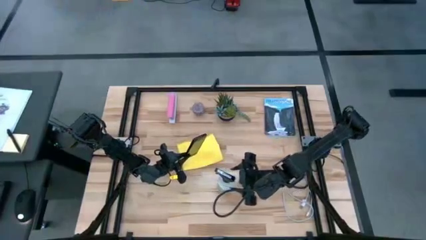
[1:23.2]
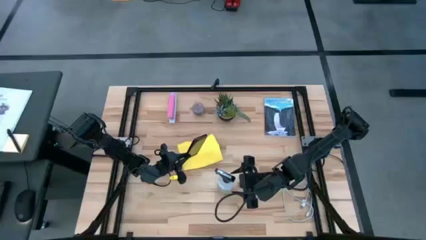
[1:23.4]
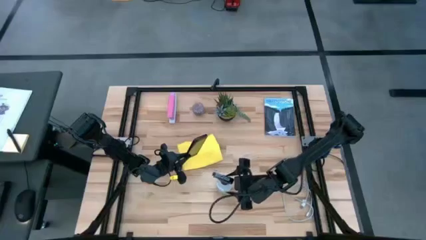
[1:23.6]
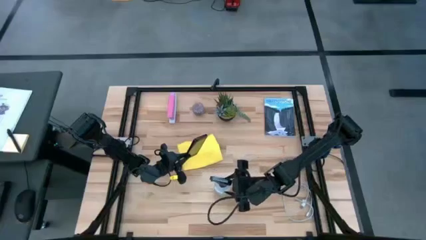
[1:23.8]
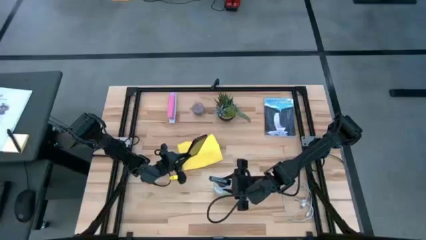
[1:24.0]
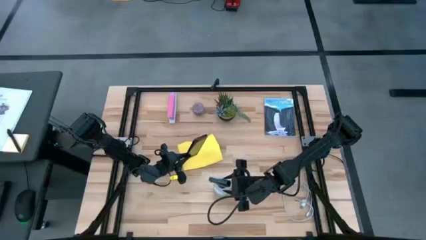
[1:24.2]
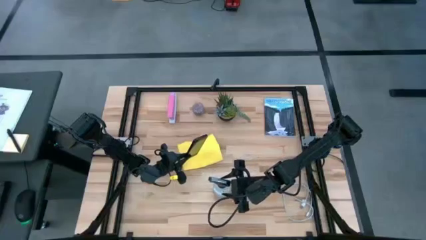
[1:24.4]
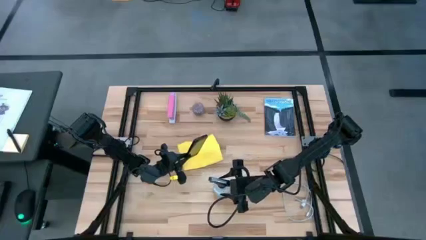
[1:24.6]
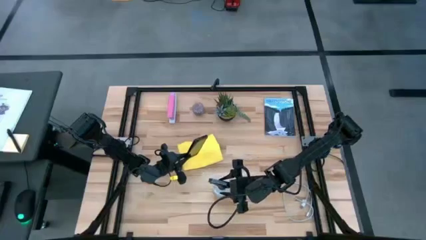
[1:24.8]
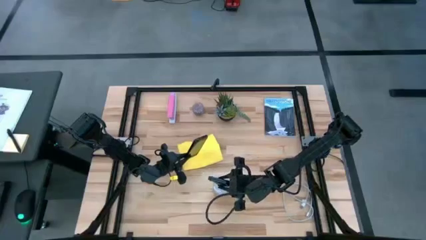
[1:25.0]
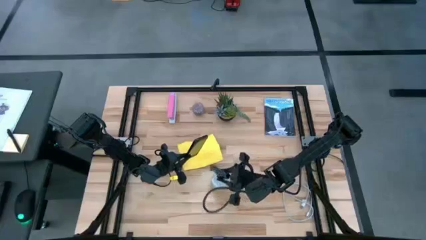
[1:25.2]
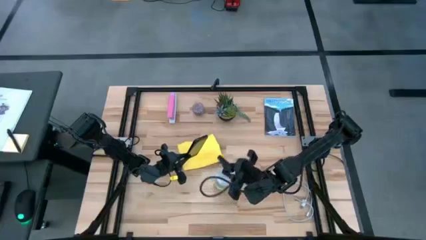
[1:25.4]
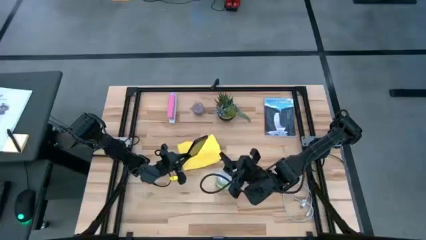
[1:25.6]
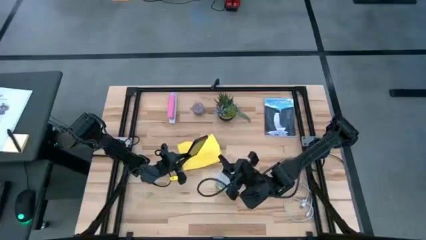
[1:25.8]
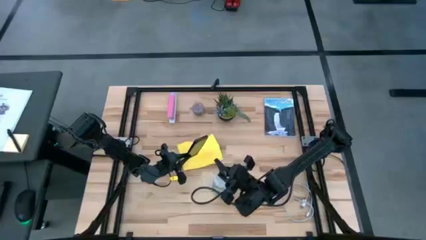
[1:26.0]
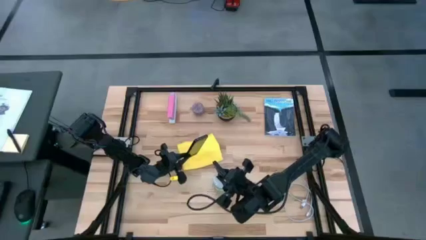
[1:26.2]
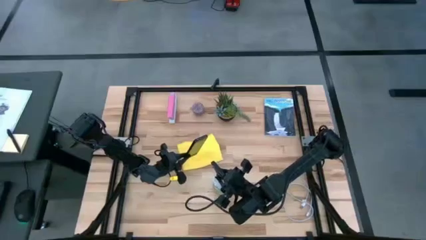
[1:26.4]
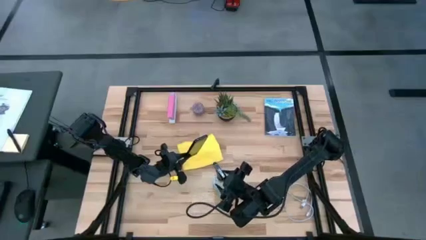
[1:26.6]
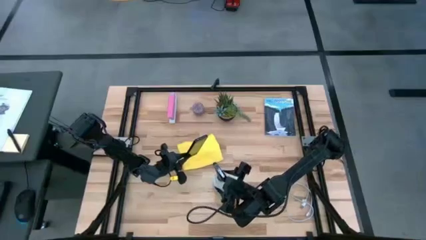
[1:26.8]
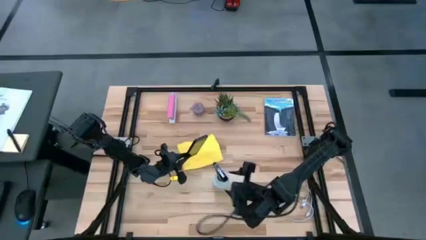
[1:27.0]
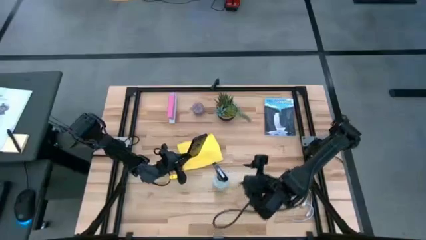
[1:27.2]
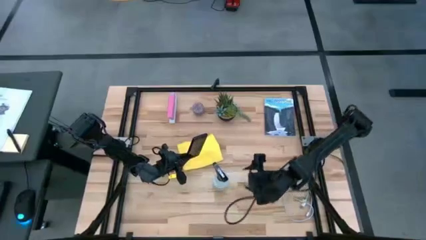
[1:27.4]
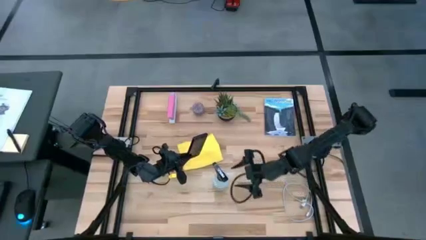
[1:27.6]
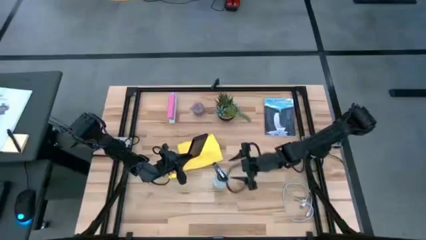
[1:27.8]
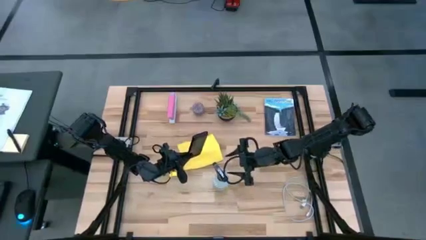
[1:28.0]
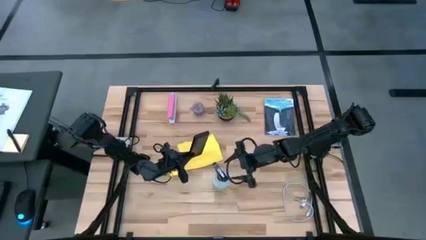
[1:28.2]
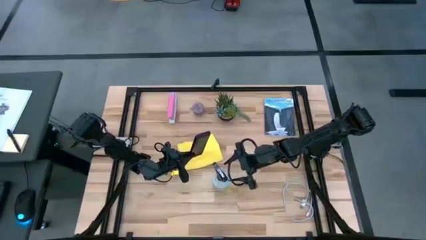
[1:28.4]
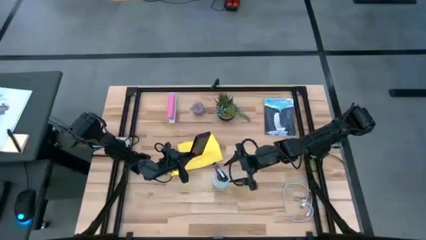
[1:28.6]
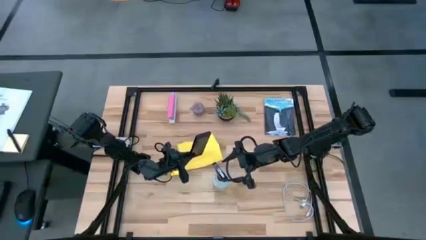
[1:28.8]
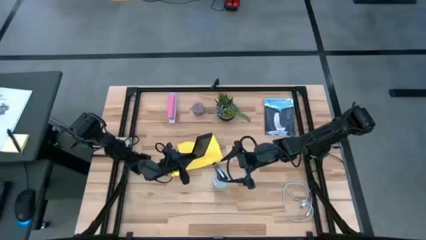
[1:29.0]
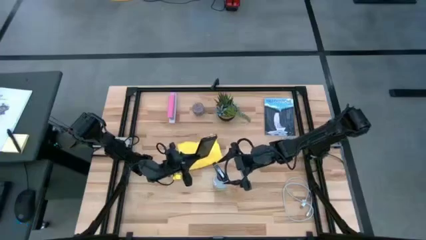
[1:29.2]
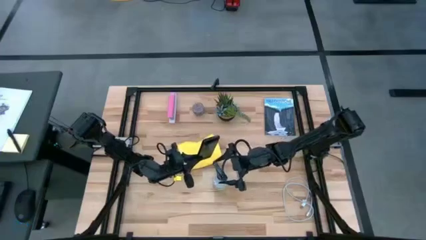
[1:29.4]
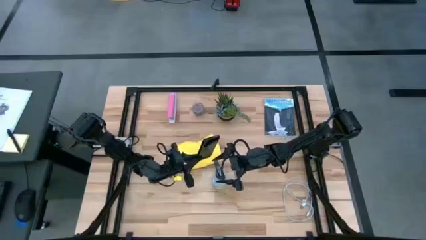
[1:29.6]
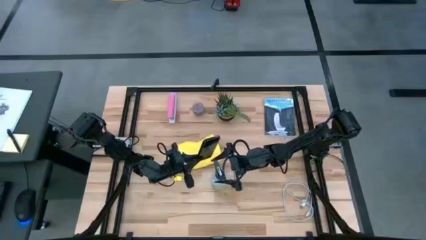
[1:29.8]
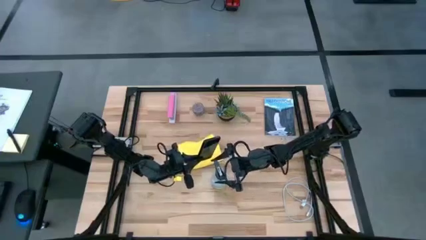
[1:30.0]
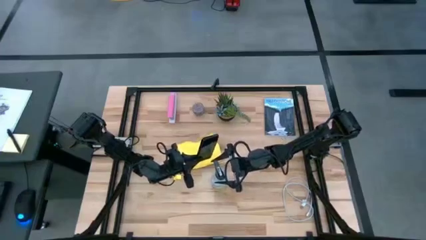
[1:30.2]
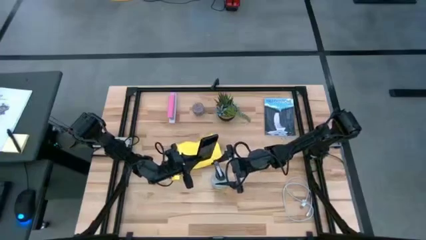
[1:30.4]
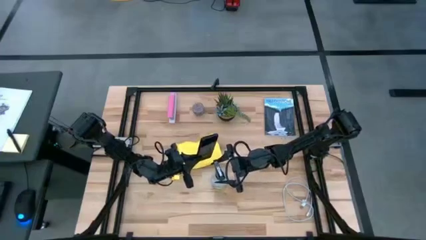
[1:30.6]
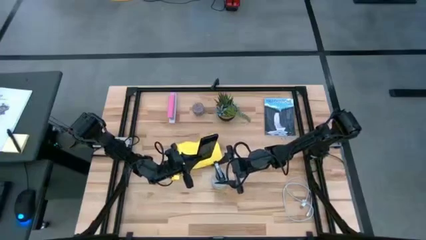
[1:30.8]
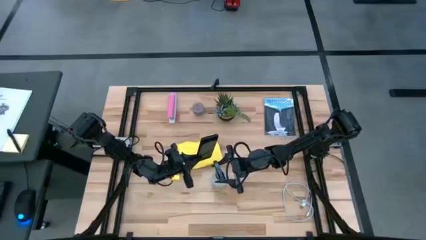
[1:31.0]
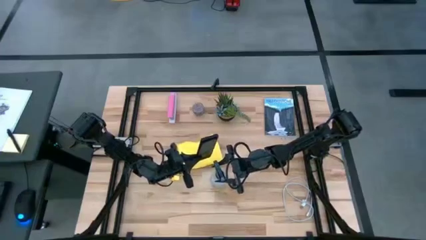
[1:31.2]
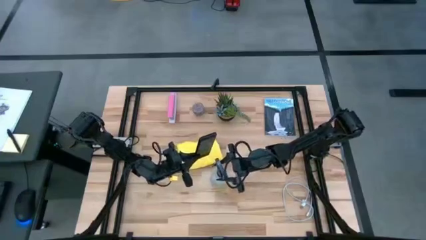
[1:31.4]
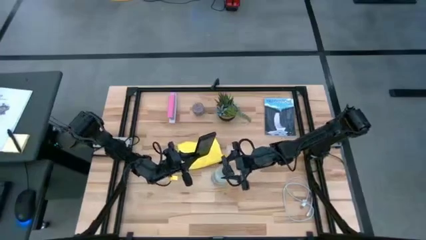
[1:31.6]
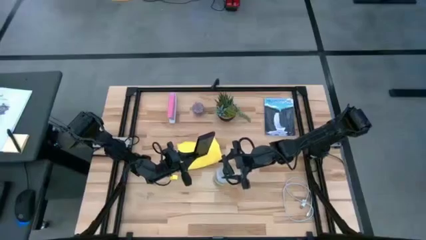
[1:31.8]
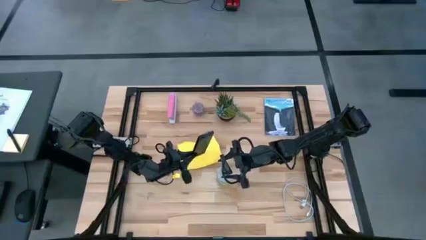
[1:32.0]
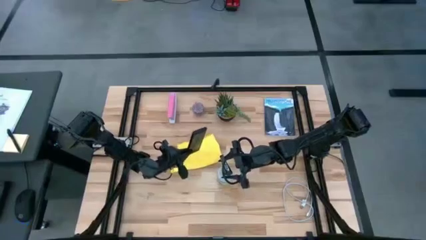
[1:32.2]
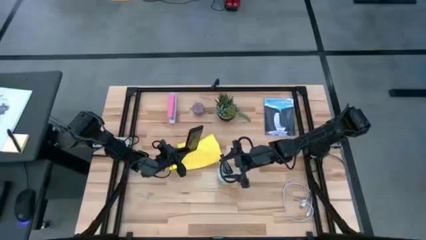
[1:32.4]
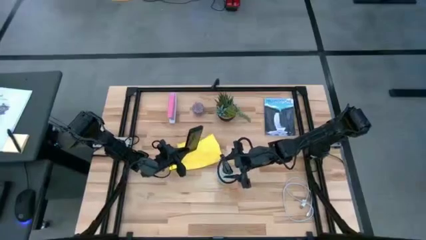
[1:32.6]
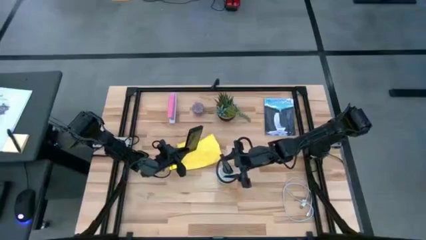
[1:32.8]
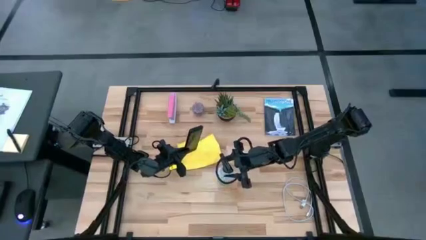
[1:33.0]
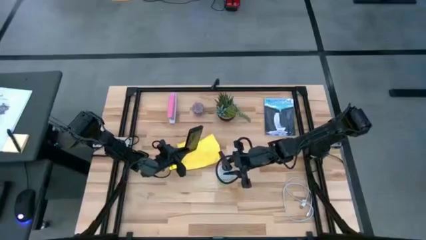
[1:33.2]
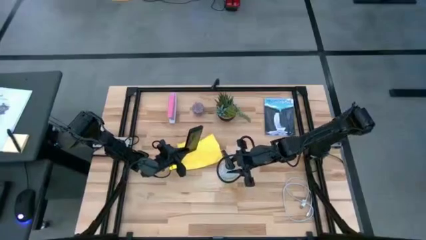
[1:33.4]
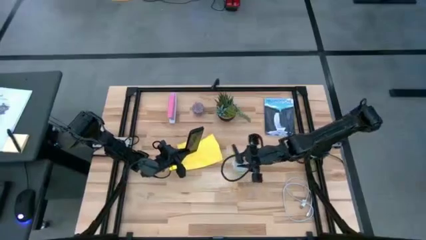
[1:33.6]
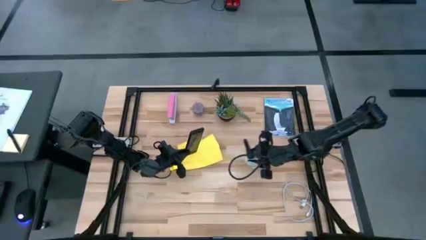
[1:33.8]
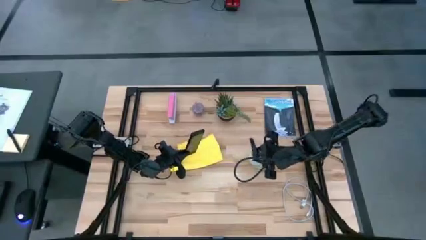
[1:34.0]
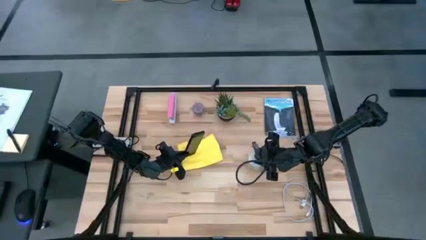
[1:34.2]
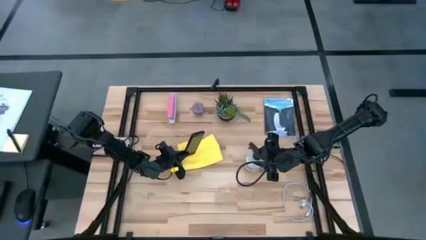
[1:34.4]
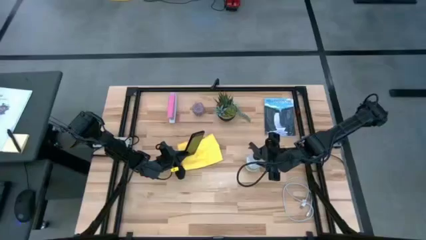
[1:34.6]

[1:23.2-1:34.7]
Task: Apply microfiber cloth
Spray the front of the cellphone with the spray bottle

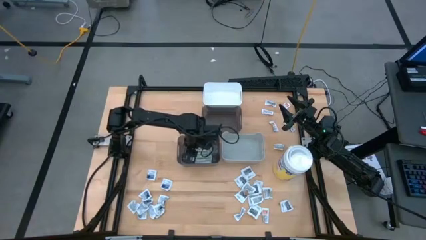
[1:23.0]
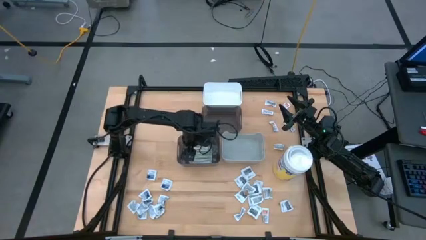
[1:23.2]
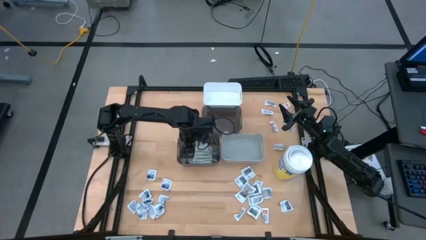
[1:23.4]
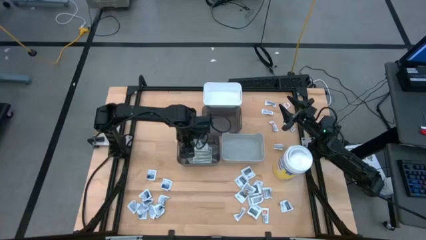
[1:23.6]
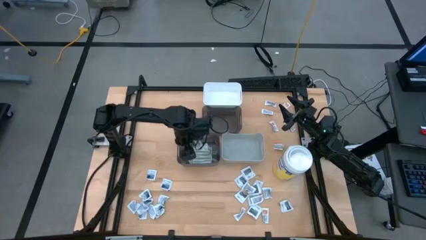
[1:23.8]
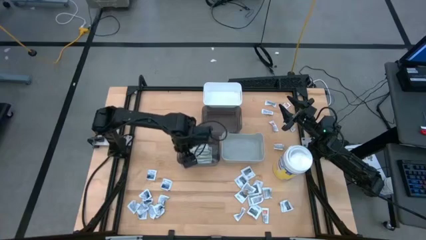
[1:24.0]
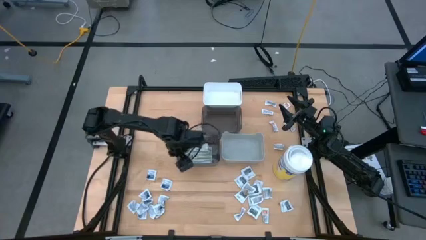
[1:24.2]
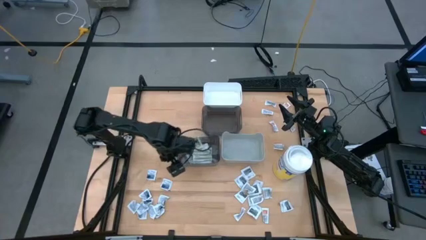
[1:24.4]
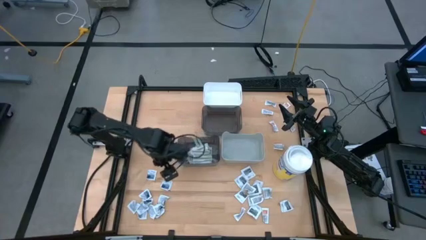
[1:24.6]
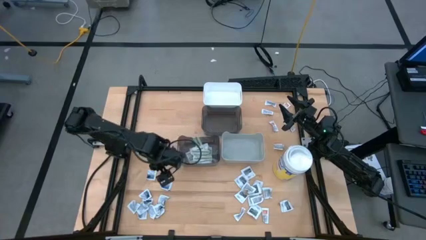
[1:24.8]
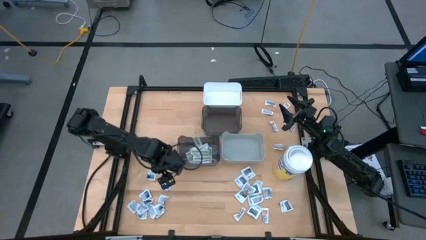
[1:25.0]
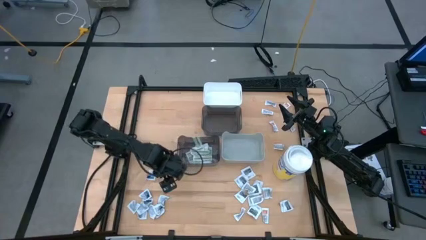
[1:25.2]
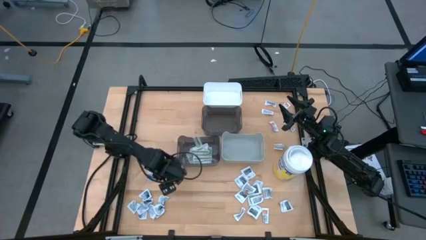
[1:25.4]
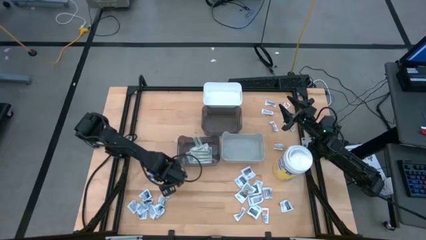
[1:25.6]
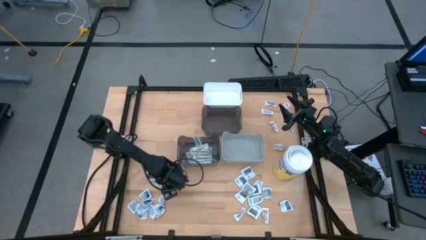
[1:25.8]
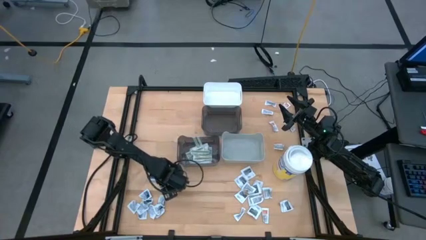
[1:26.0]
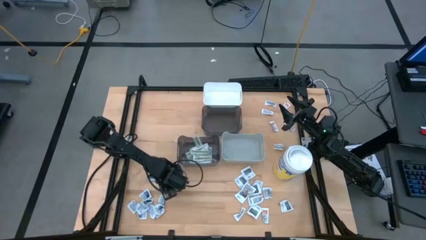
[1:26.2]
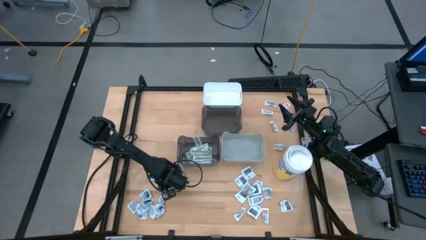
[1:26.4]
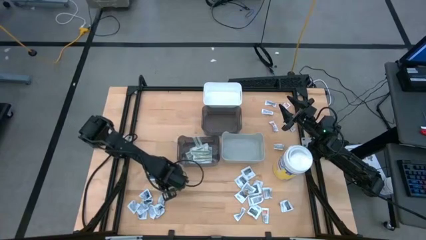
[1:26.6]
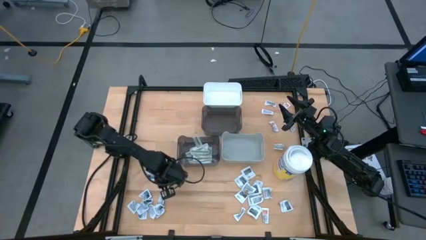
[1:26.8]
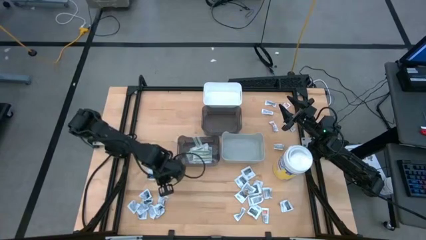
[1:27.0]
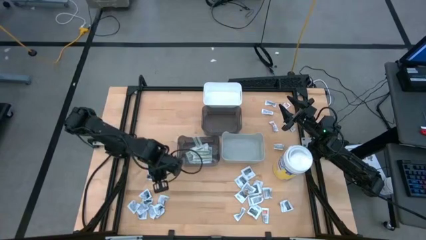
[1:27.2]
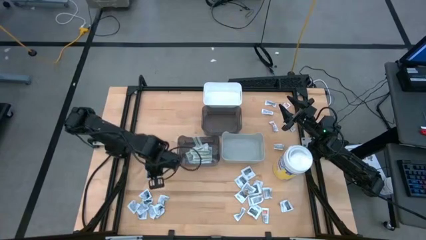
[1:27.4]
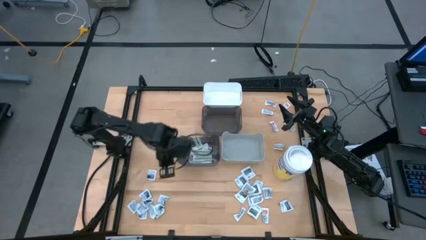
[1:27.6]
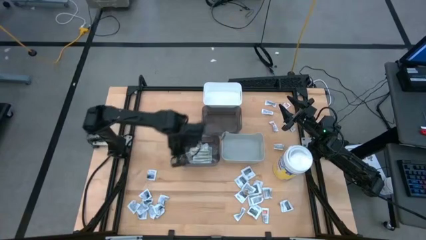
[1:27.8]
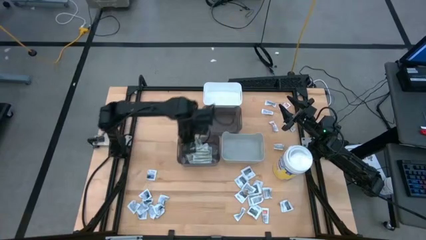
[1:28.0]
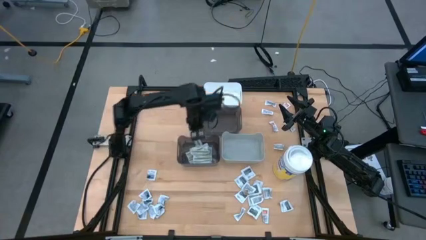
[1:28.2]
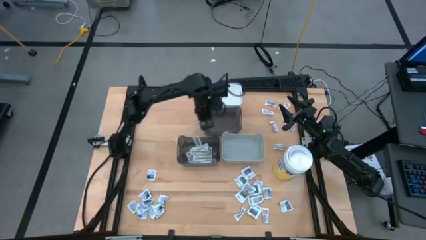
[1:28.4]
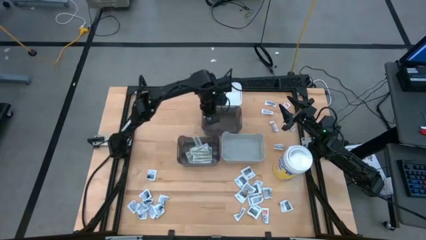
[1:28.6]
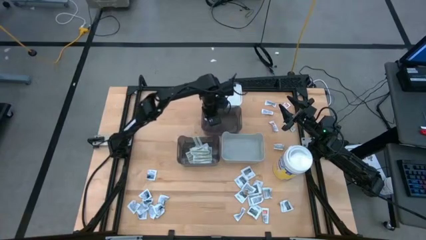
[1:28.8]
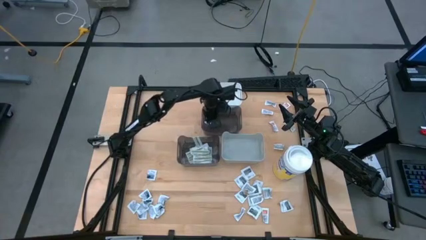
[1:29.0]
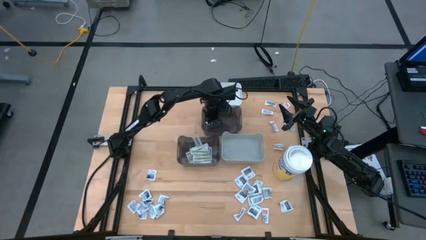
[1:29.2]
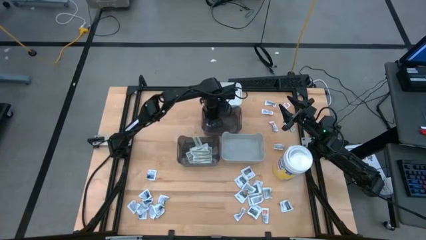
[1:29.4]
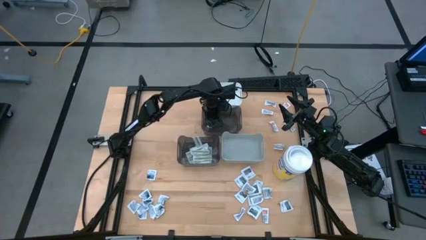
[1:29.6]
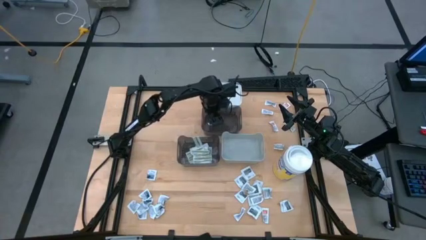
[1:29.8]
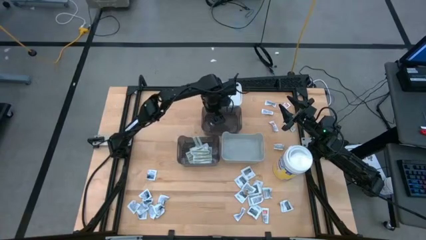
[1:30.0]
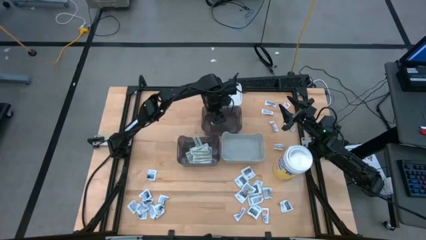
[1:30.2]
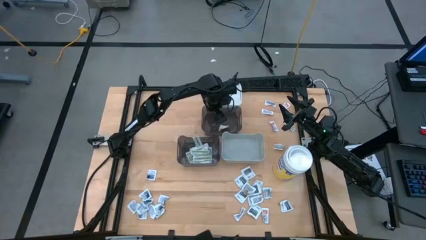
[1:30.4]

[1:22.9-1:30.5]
Task: Pick & Place First Aid Supplies
Put the white alcohol pad into the top black bin
